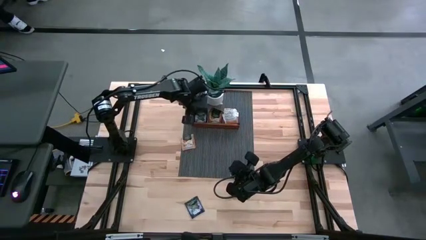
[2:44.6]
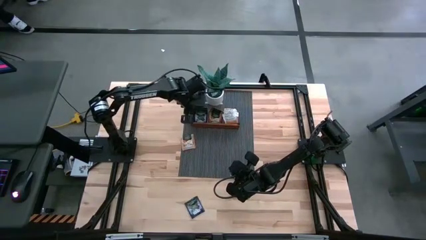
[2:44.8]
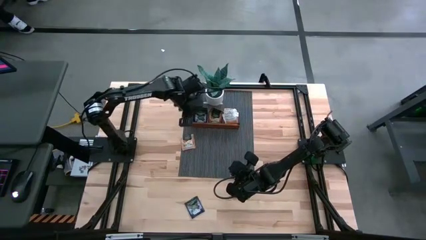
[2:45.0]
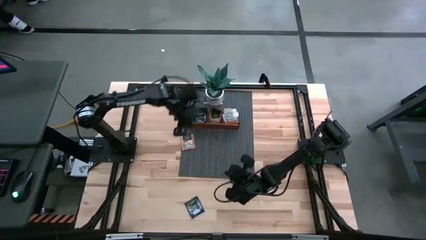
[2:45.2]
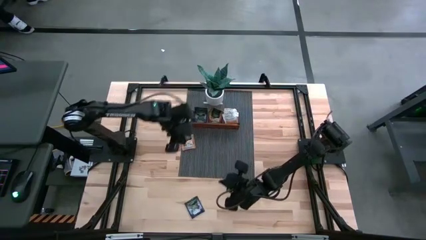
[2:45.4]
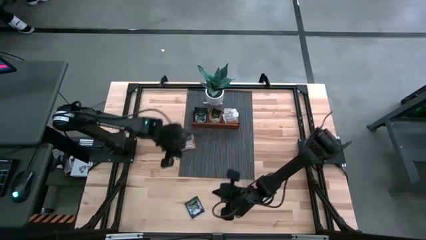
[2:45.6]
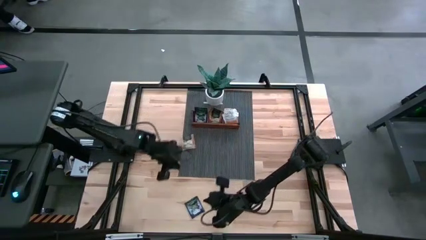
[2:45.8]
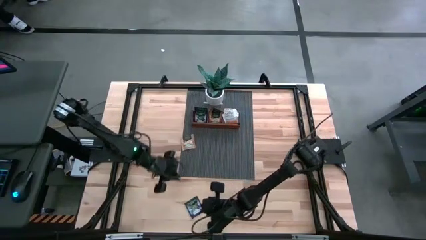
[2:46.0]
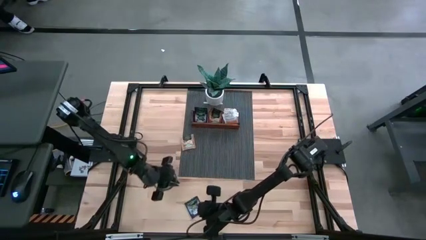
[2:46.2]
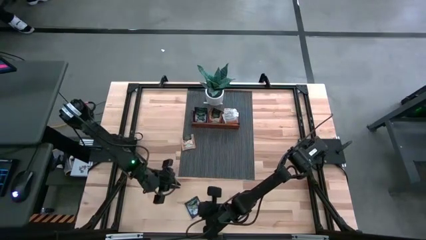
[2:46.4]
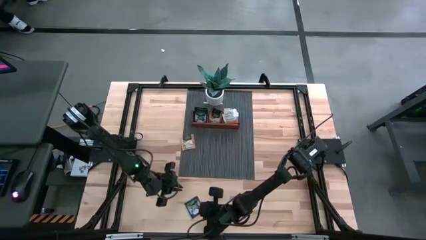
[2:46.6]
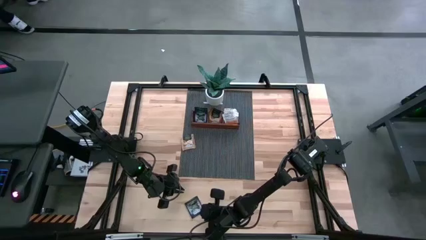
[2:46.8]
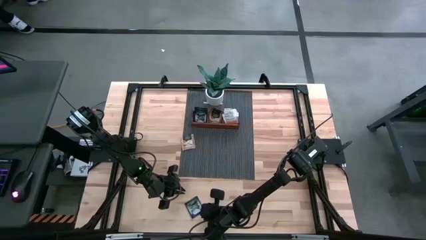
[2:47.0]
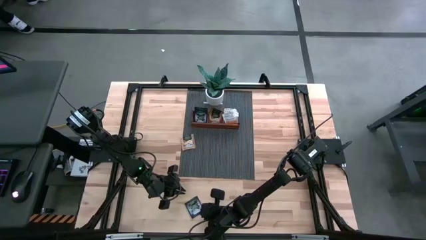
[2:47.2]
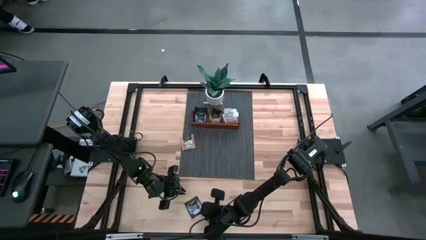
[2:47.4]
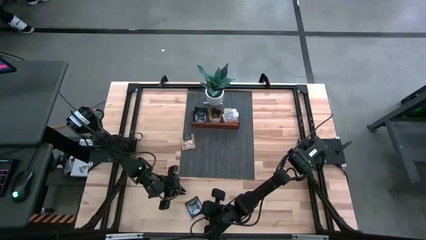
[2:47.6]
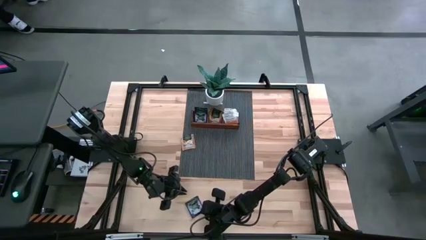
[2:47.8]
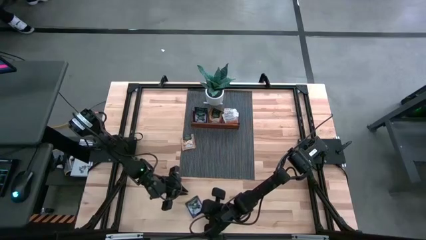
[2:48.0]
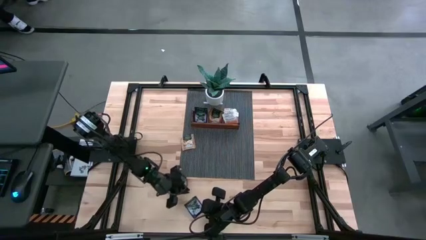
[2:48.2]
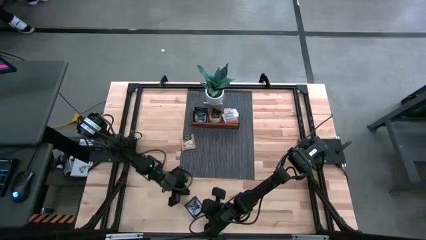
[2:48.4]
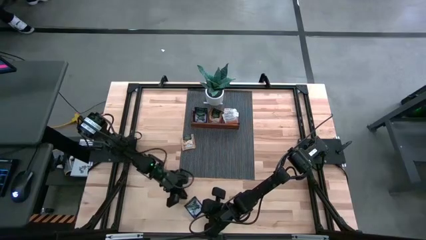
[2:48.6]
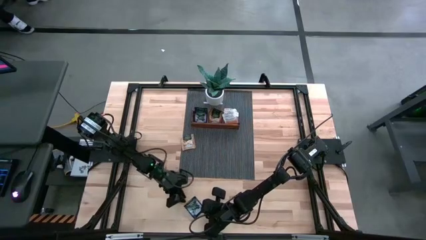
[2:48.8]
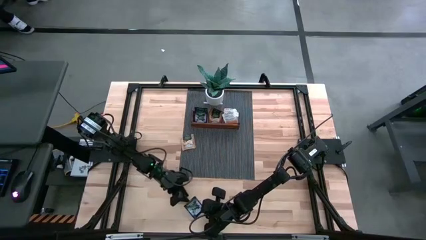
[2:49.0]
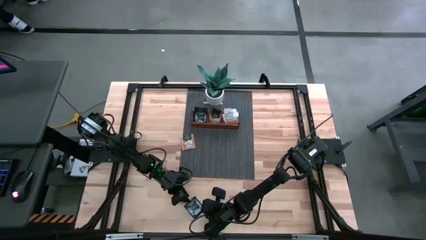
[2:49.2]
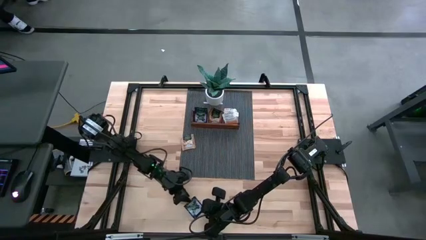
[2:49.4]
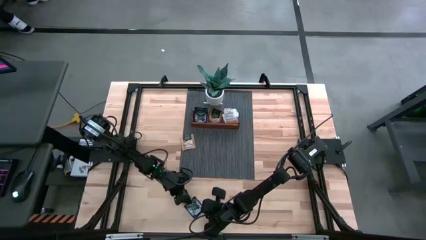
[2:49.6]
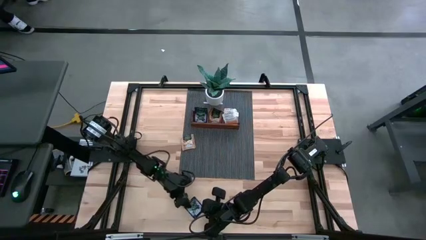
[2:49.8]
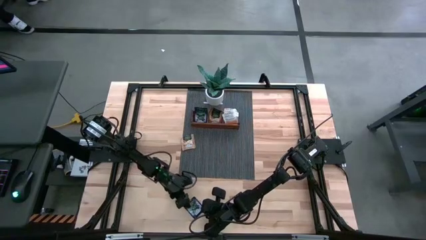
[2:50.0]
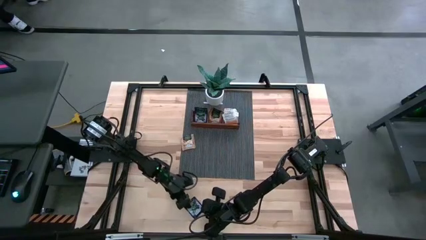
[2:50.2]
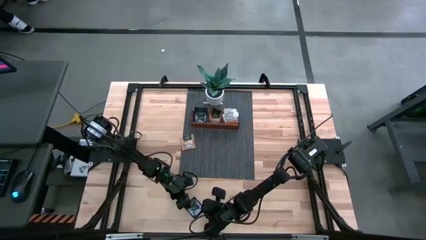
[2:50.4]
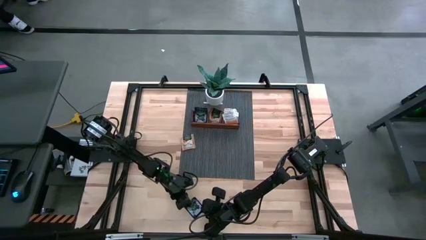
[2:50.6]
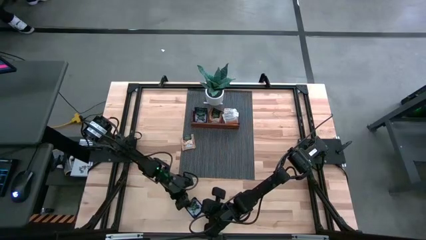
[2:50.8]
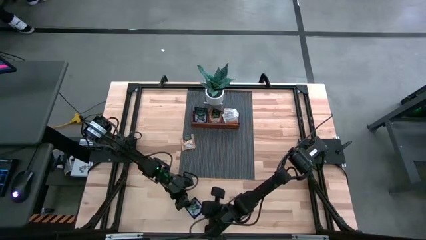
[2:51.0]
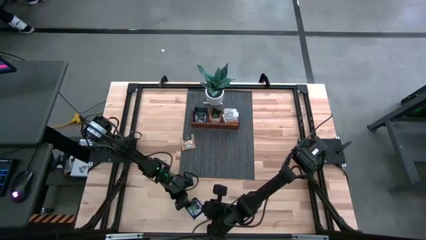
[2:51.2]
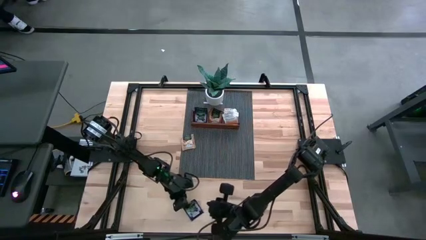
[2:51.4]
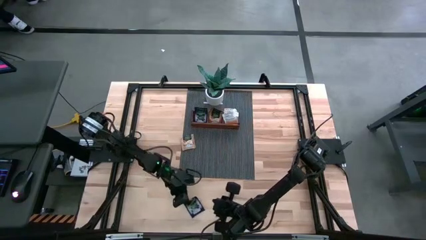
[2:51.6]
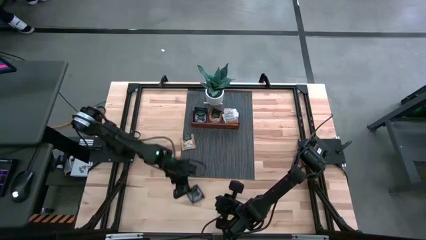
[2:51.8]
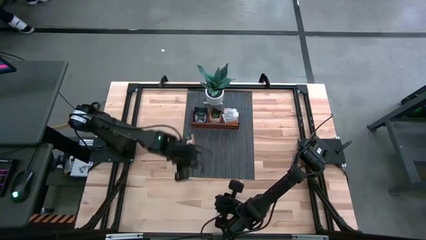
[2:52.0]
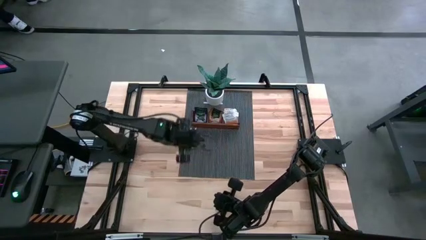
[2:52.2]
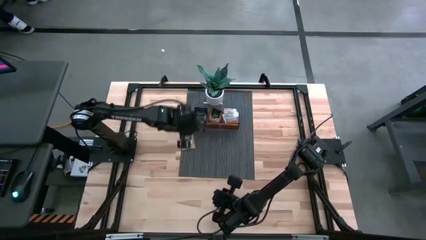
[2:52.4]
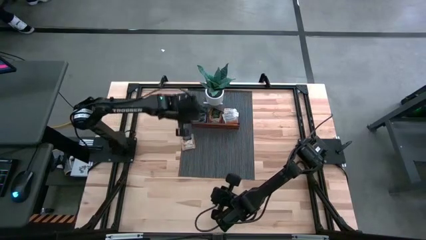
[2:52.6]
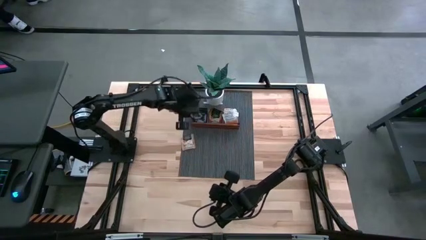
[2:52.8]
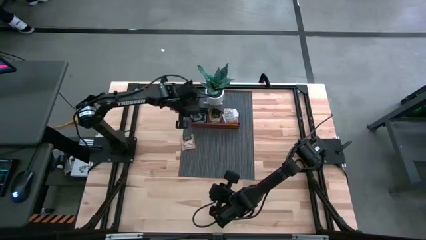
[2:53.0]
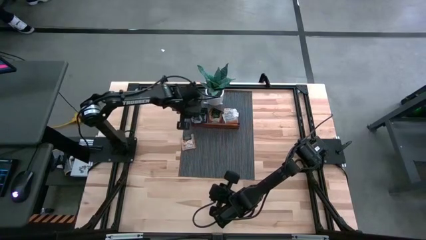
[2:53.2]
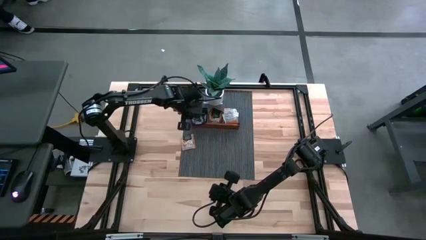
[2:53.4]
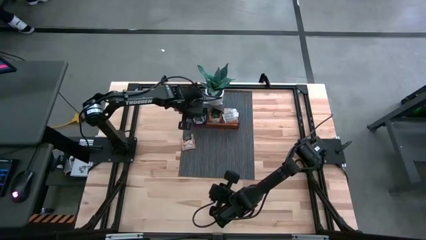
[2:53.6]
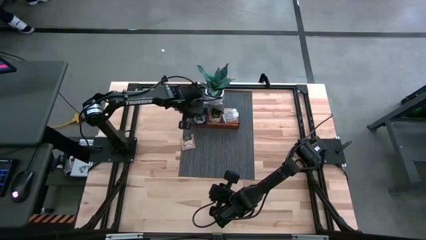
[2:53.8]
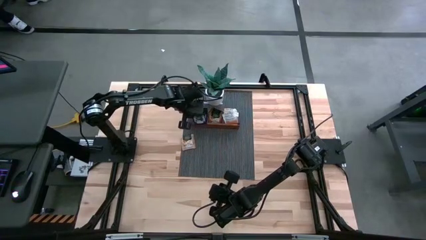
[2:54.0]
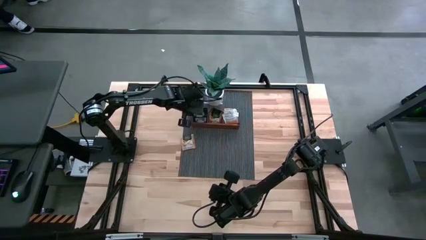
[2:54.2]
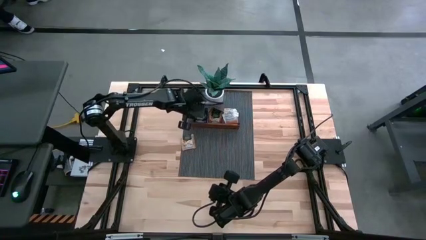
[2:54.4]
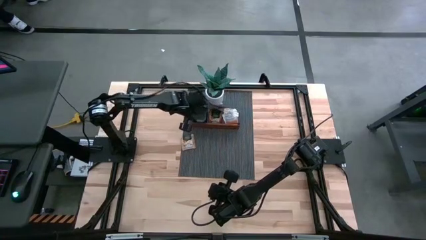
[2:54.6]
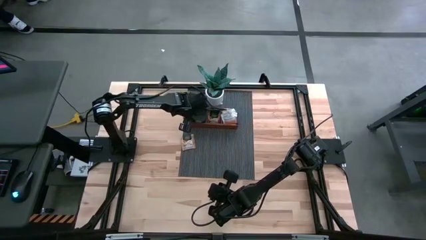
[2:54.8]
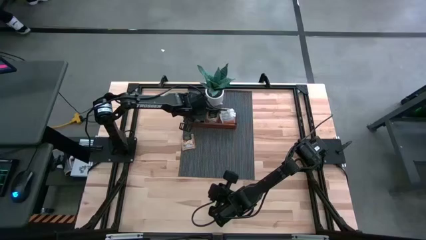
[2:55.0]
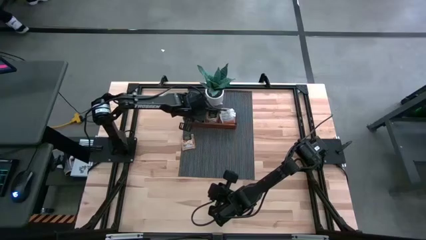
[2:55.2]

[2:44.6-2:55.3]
Task: Pick & Place Tea
Put the purple tea bag into the left section of the wooden organizer

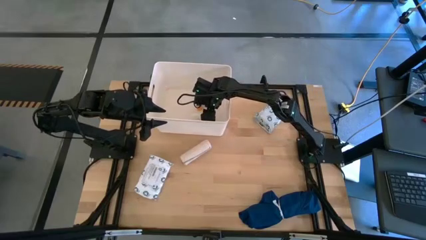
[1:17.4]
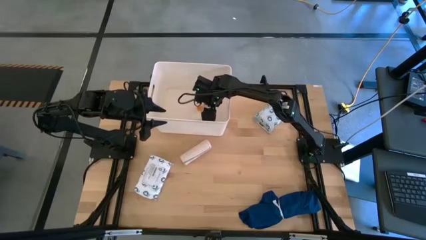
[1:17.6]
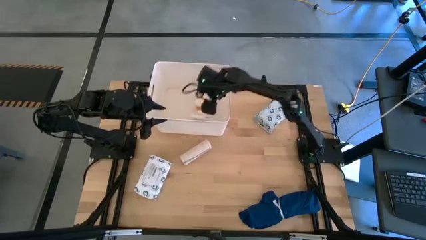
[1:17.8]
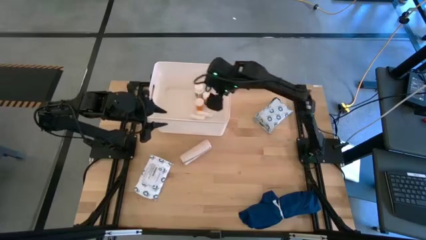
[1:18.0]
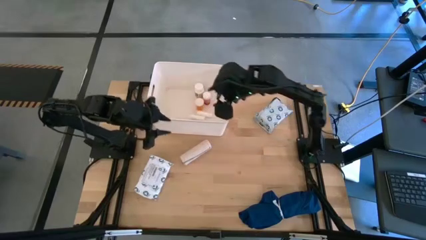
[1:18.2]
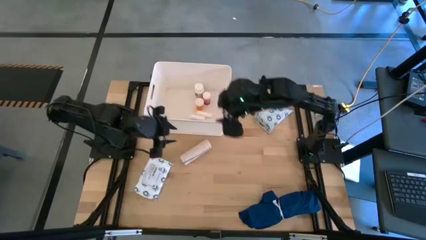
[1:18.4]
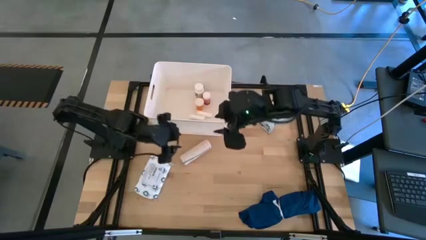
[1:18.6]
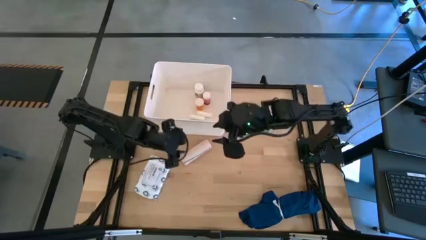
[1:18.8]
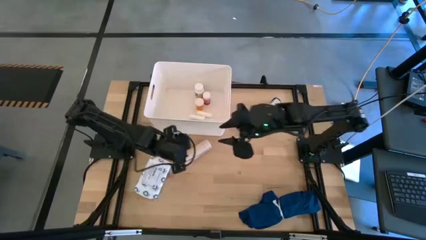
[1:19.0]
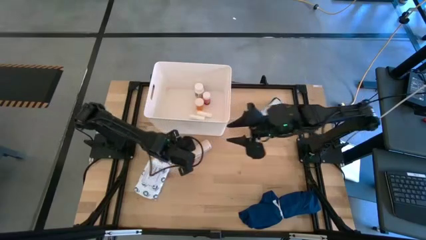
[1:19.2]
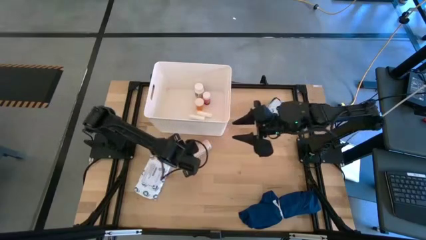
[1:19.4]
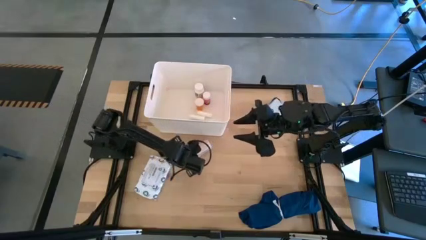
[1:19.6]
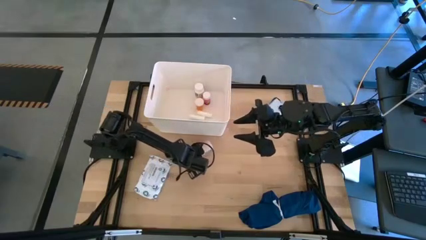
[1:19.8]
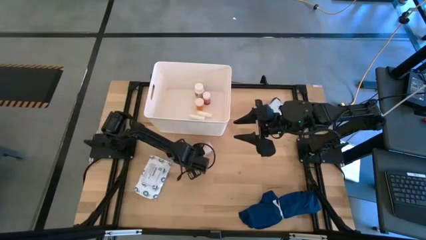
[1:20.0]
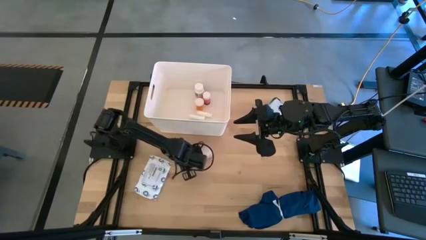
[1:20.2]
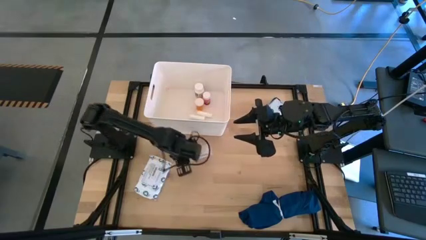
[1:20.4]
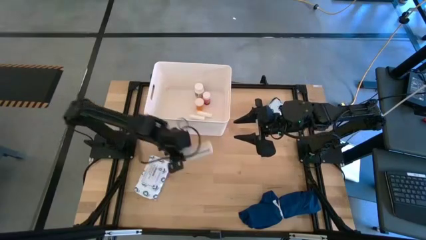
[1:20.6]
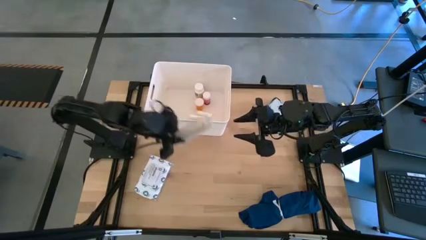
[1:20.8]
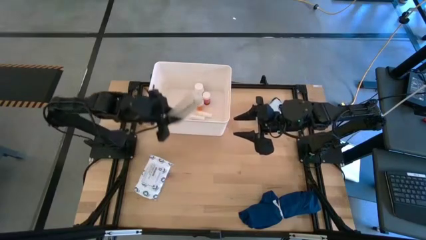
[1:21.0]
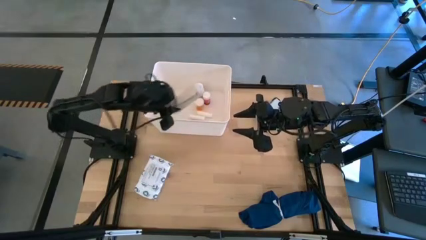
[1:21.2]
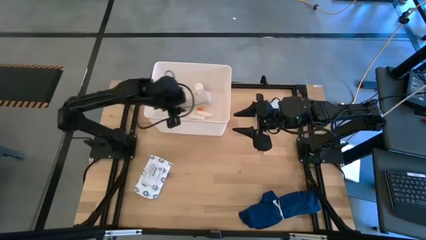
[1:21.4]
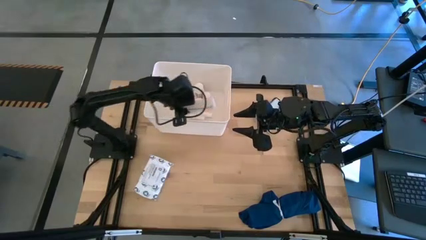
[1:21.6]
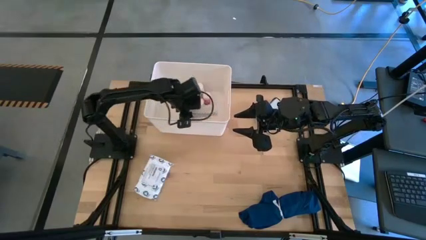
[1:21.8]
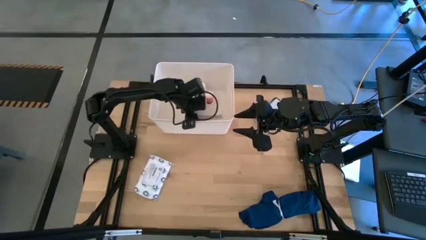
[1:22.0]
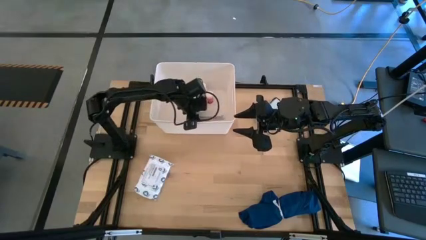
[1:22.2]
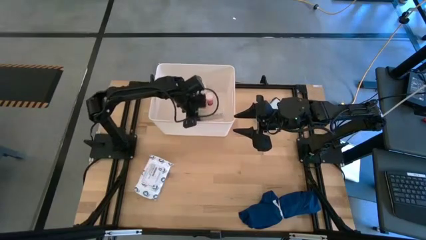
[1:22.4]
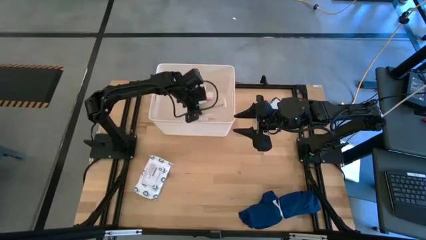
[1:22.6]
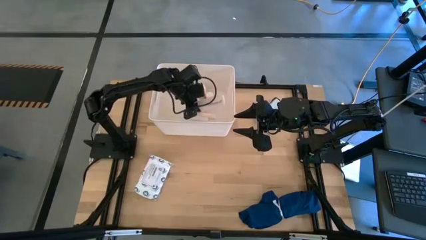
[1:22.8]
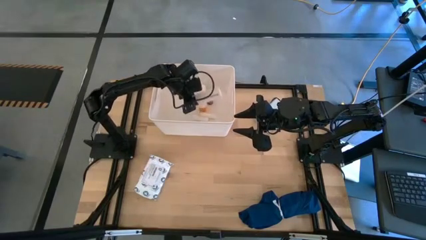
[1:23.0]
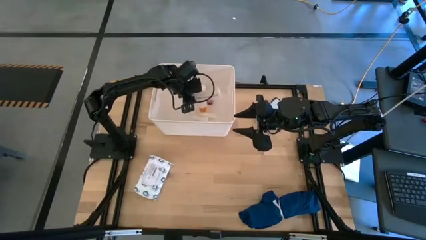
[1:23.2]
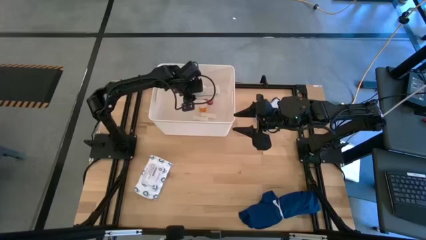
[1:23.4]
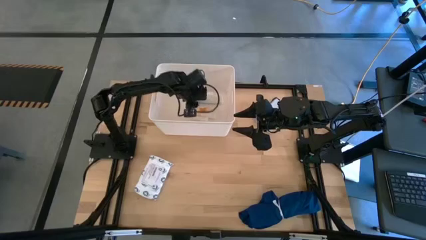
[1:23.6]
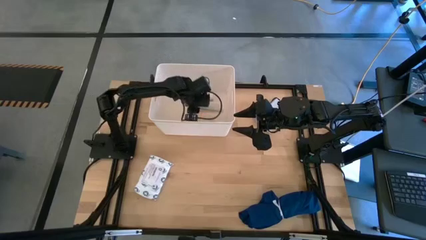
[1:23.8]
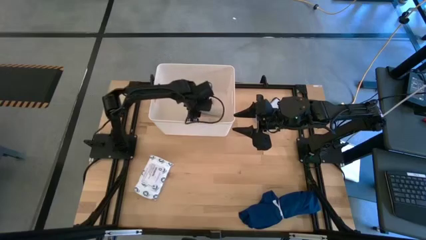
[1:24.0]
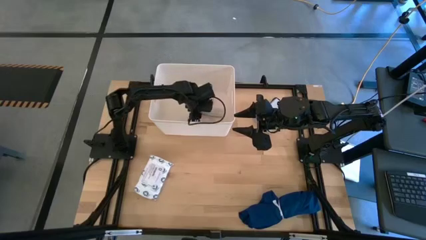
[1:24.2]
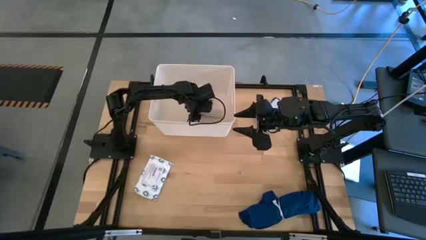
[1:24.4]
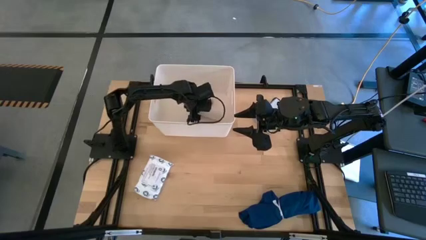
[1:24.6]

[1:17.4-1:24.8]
Task: Pick & place medical supplies in basket/bin
Put the white bandage into the white bin
